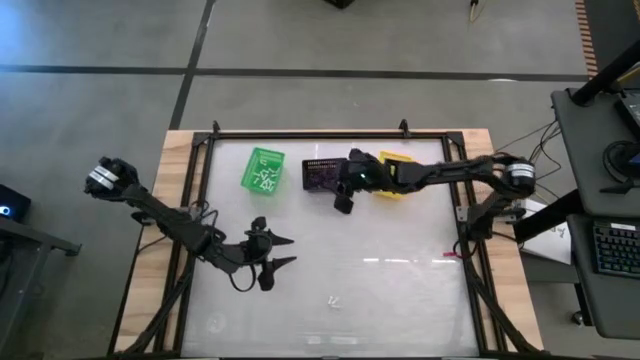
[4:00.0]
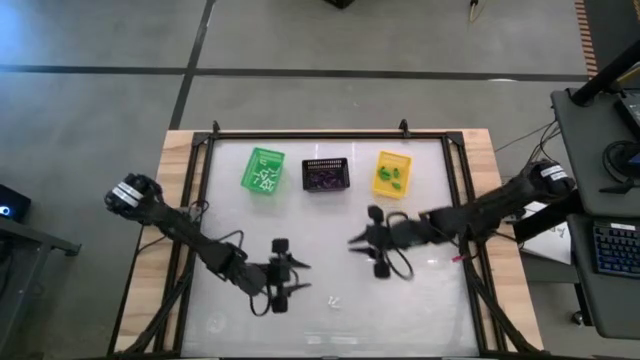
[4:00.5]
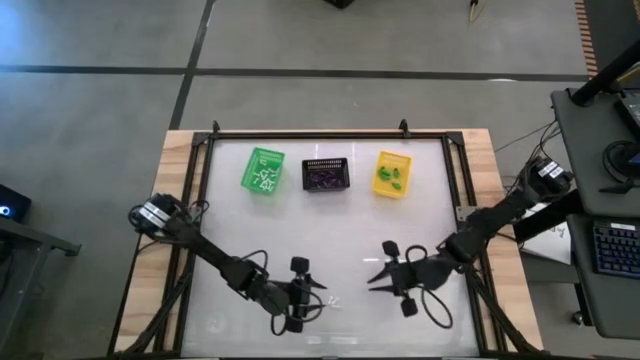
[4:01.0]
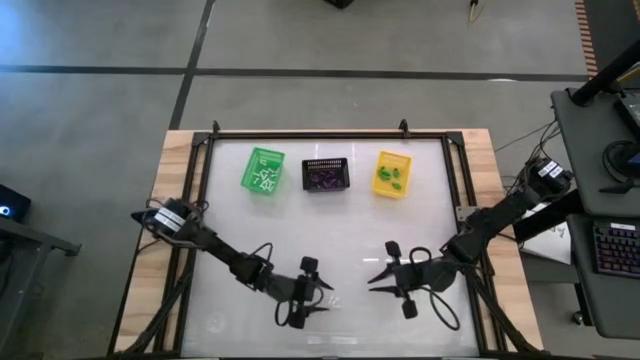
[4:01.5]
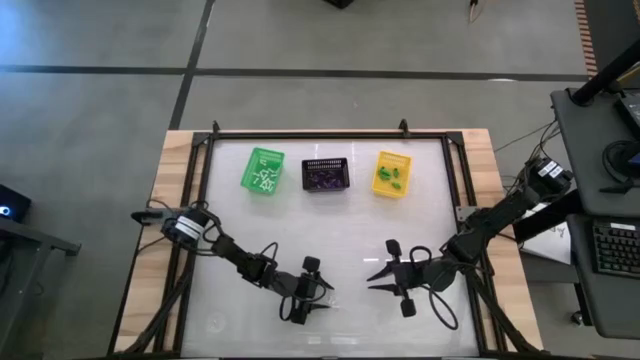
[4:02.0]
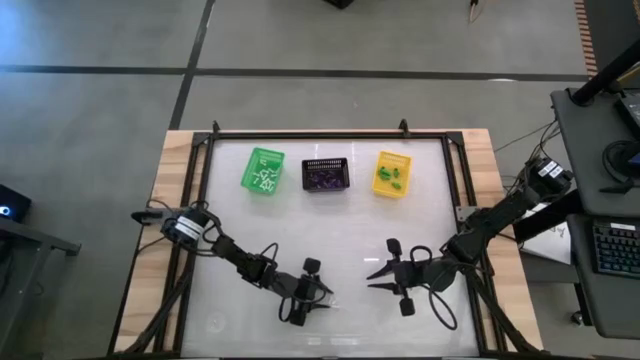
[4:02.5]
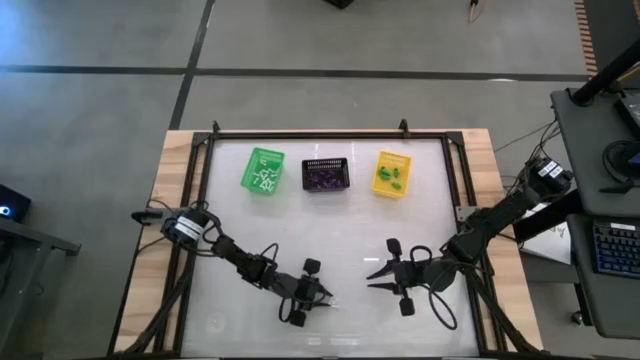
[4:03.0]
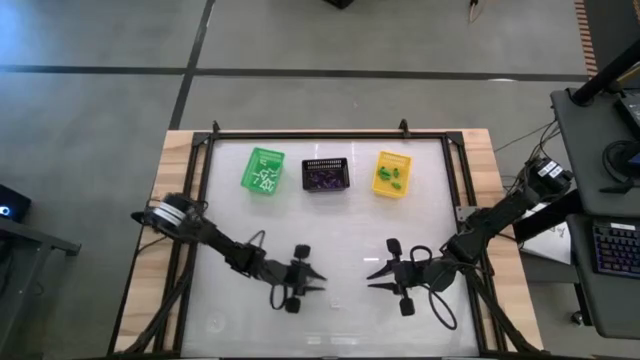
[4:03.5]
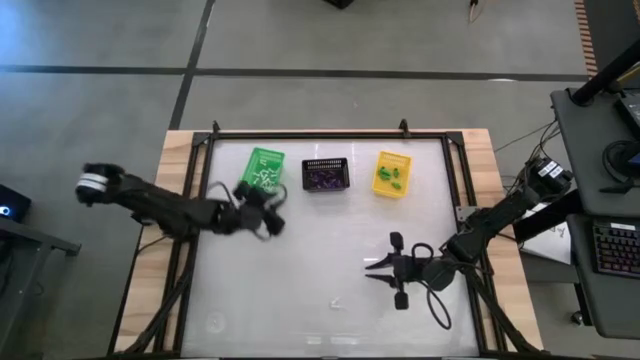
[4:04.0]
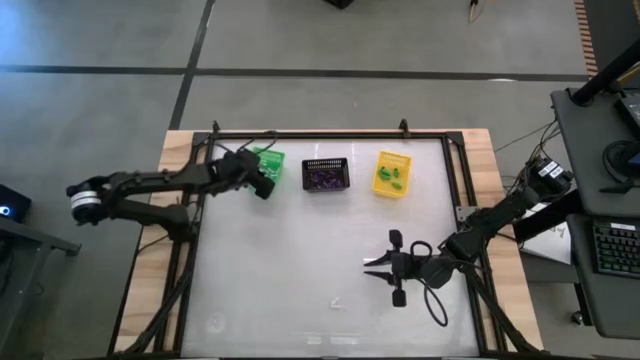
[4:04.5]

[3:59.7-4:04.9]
Task: Sort Halloween decoration
Put the white bone toy into the green basket

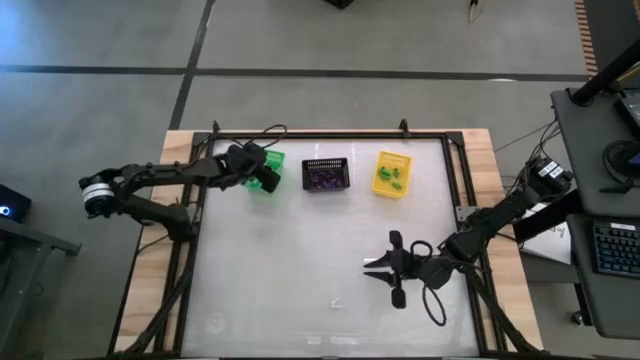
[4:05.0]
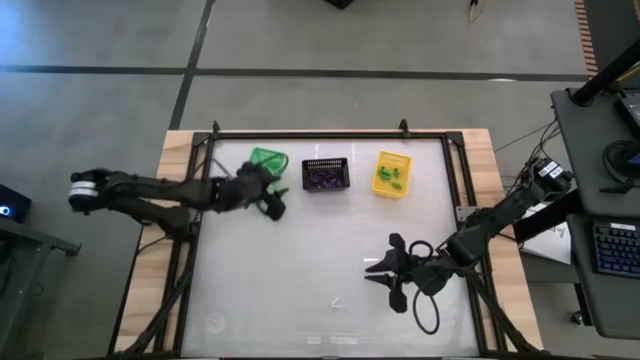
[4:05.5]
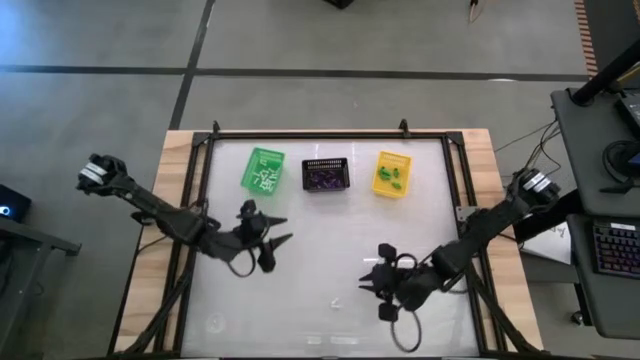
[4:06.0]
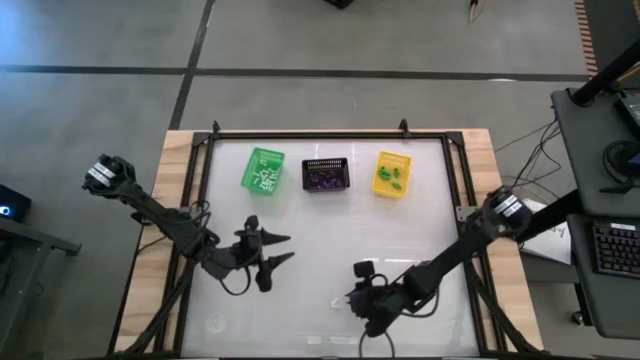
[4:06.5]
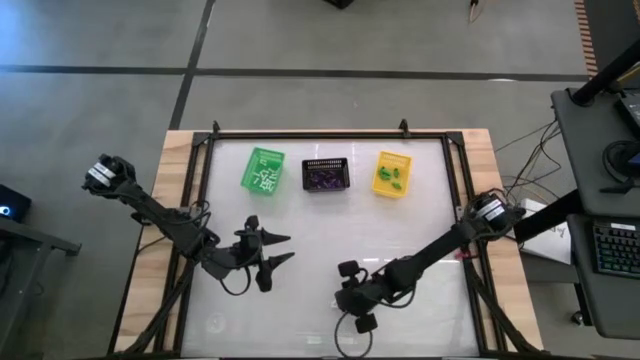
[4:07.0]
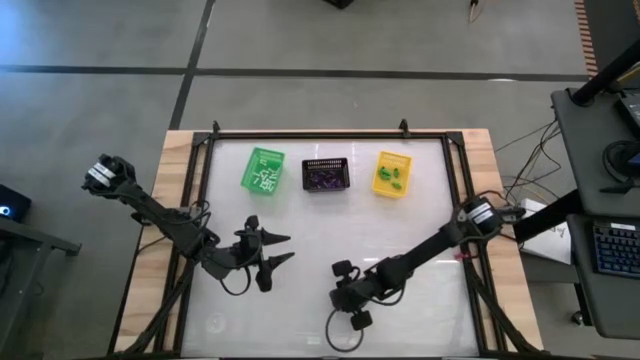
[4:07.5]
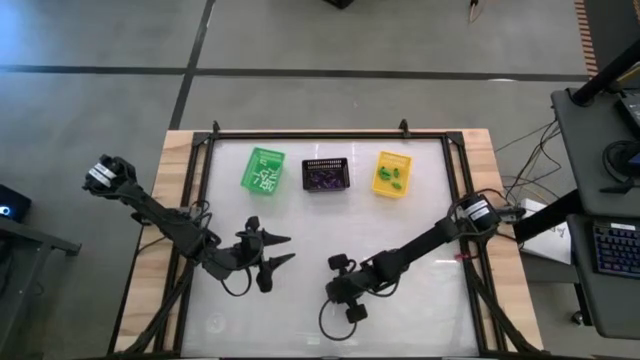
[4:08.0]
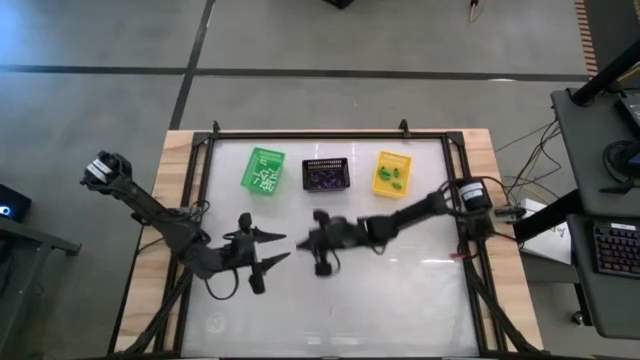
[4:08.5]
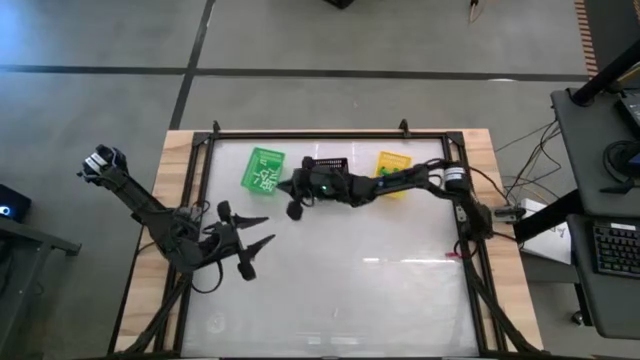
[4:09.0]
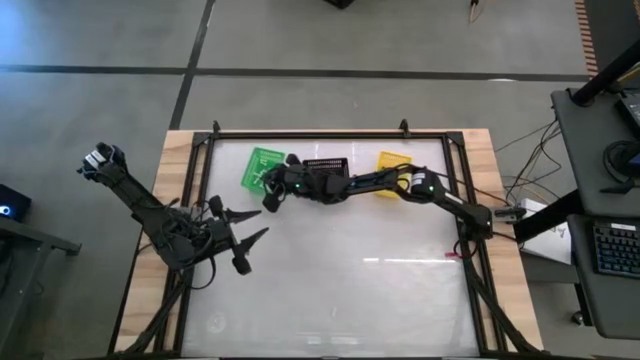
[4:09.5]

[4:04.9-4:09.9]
Put the white bone toy into the green basket

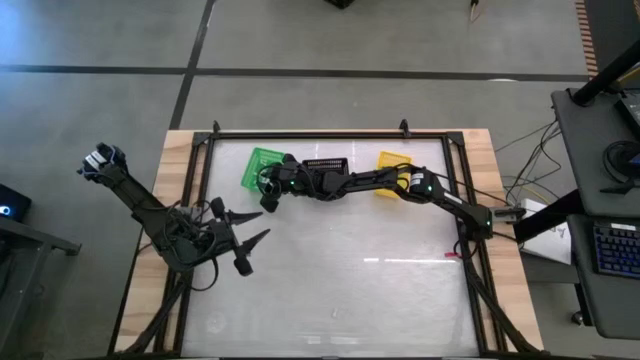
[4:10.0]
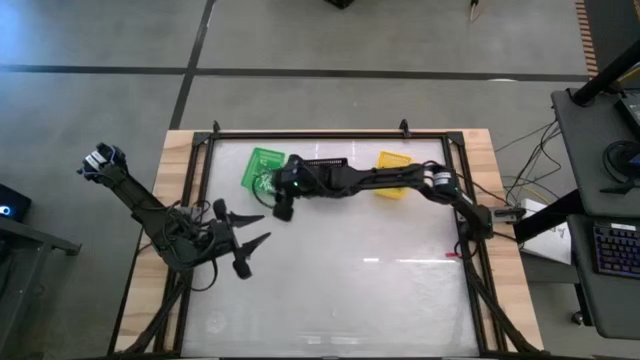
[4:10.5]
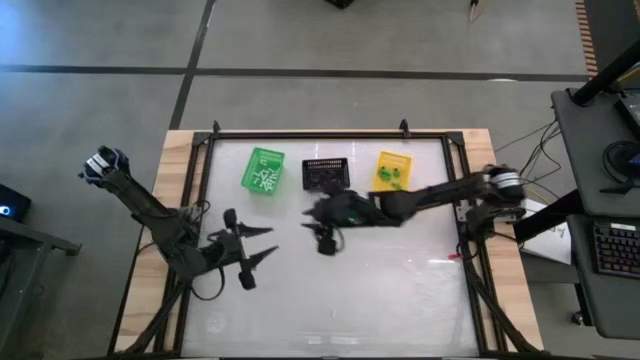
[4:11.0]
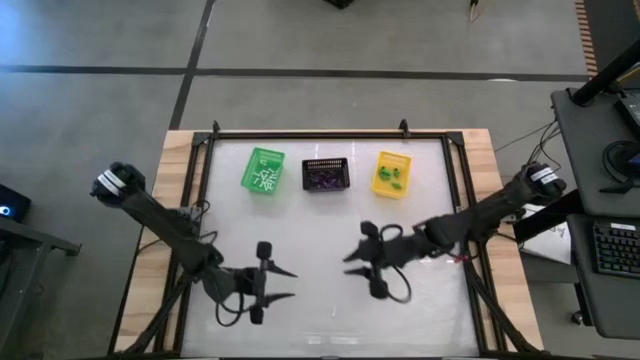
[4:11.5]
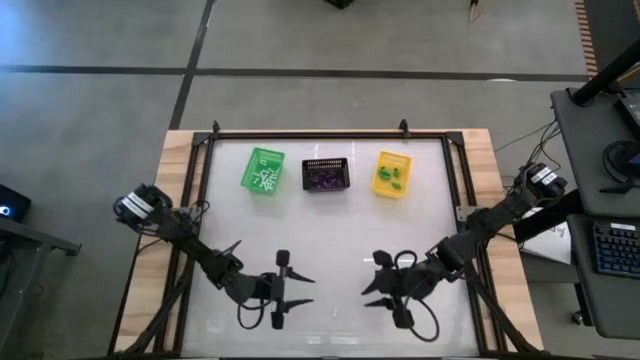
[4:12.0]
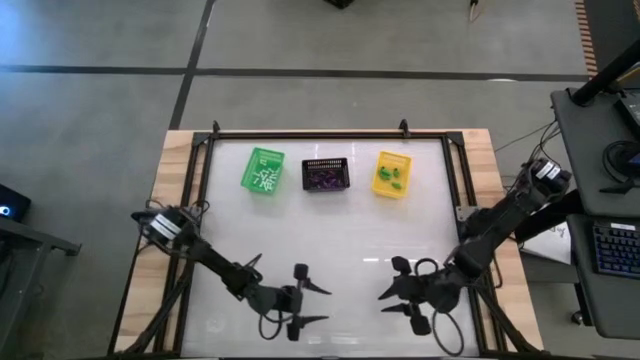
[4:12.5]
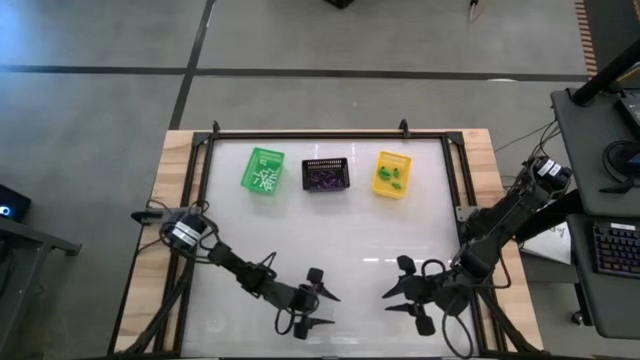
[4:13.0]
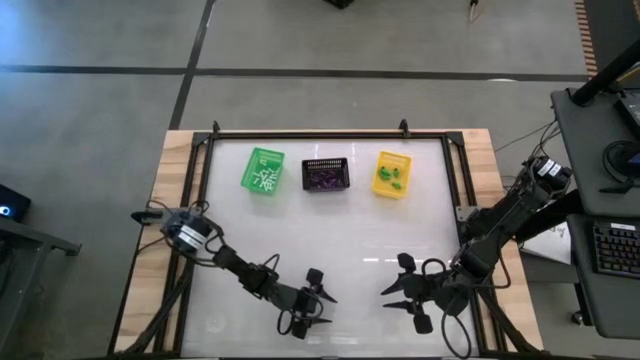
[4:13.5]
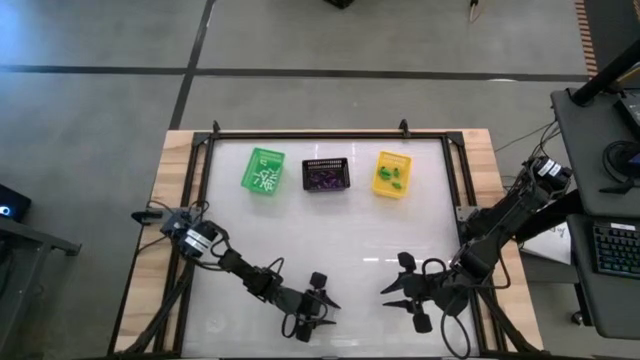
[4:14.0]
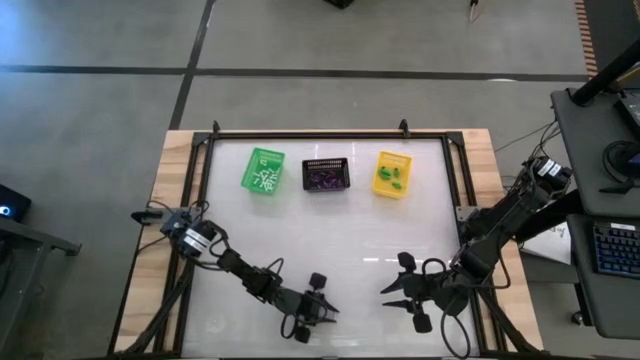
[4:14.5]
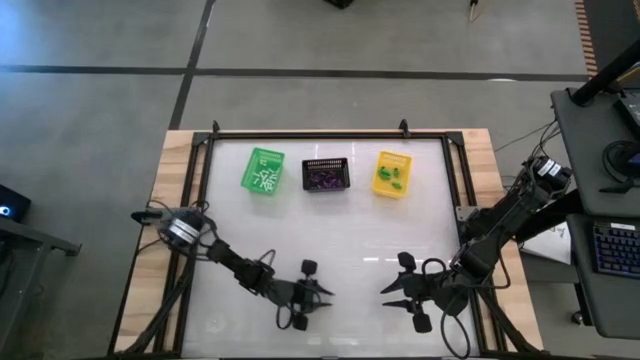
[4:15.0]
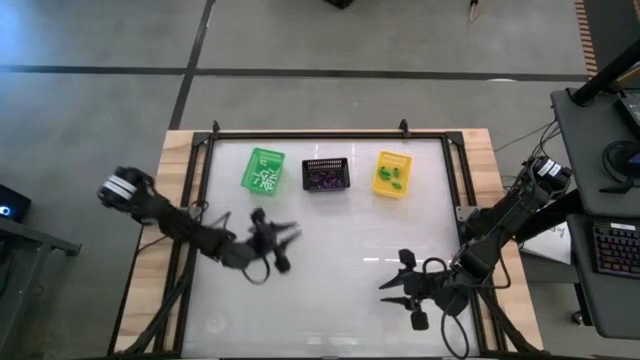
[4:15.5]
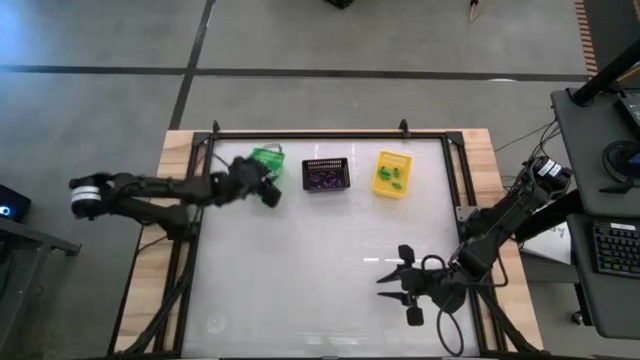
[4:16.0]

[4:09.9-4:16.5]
Put the white bone toy into the green basket

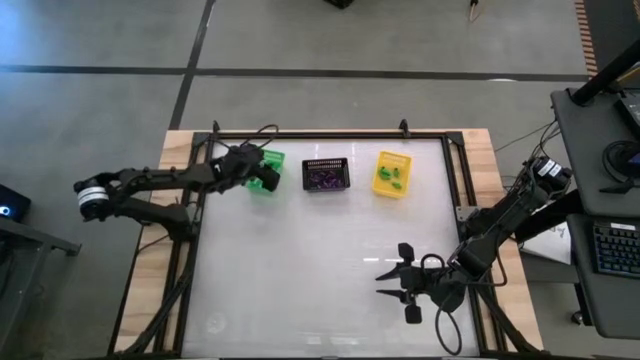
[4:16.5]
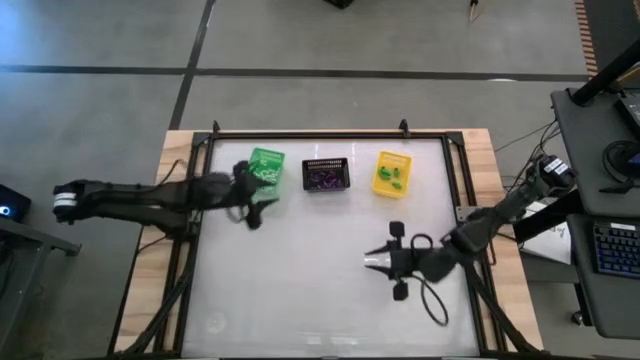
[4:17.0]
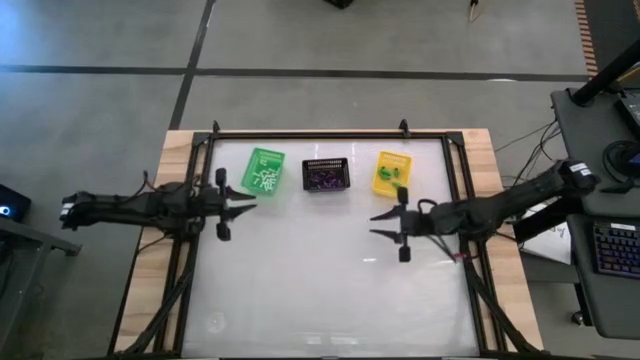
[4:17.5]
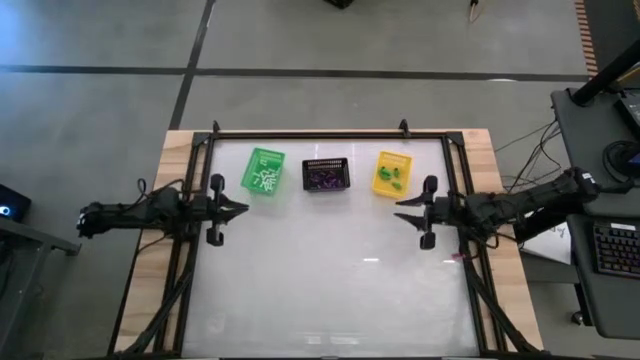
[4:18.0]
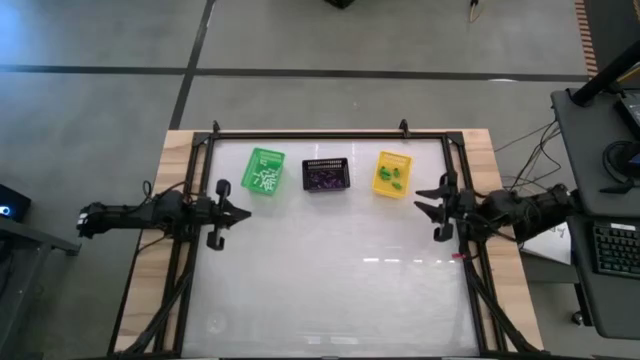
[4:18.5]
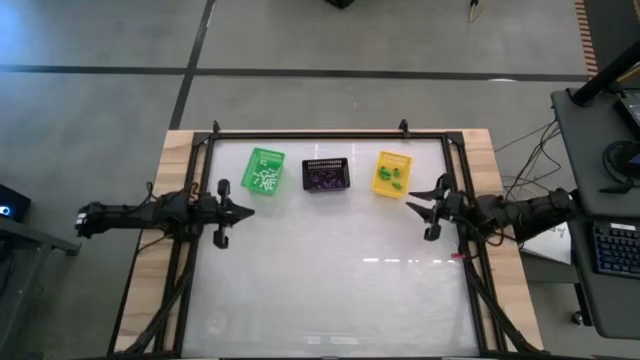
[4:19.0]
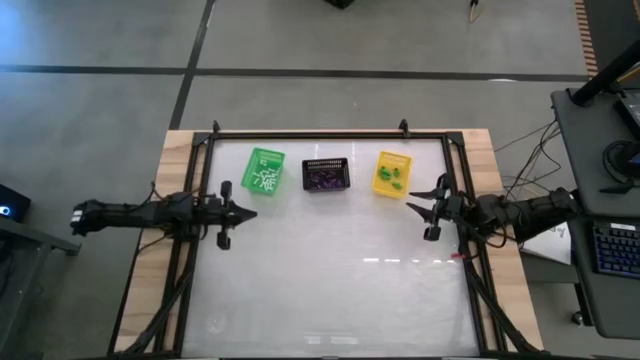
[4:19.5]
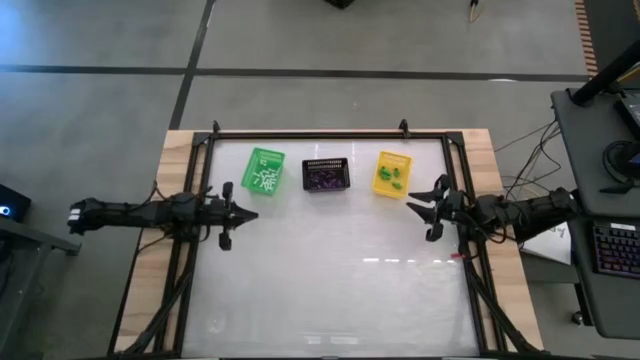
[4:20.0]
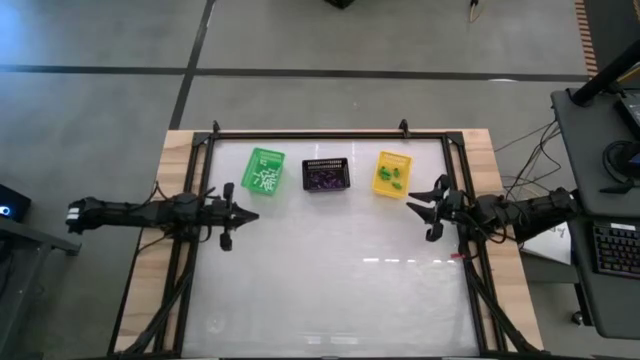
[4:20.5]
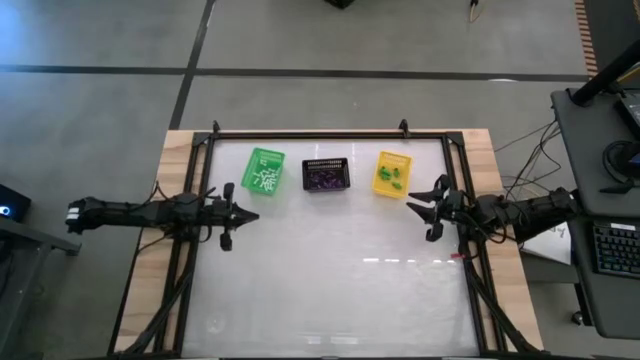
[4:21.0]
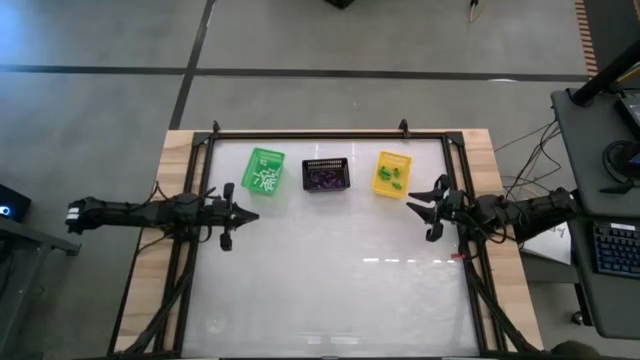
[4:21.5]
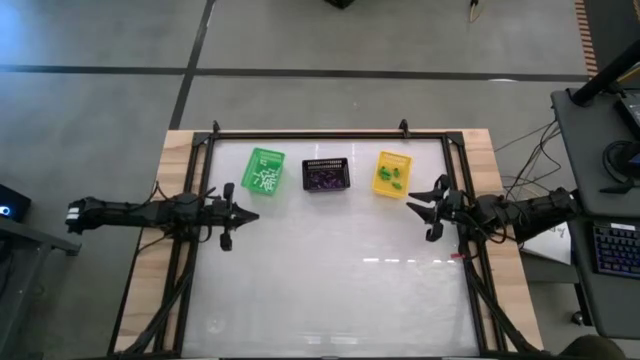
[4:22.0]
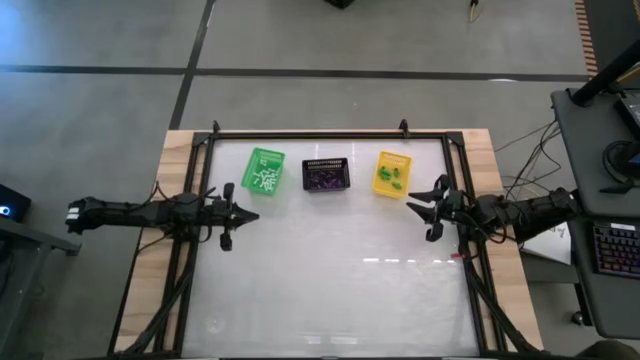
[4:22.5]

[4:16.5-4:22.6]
Return to Home Position
